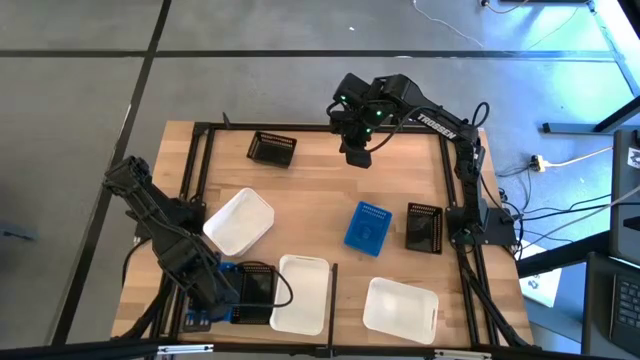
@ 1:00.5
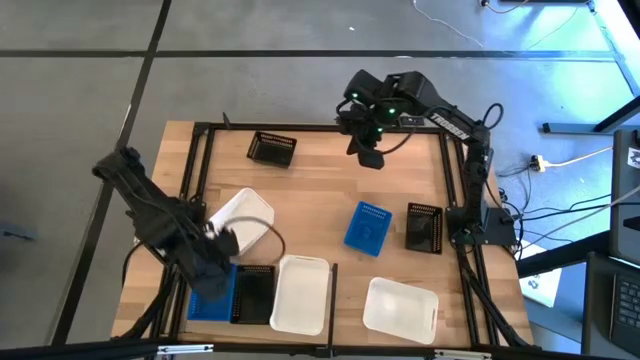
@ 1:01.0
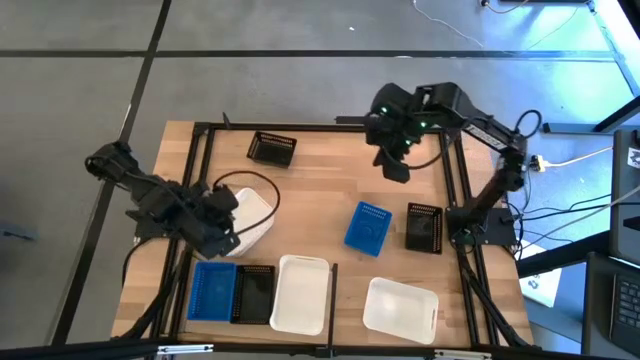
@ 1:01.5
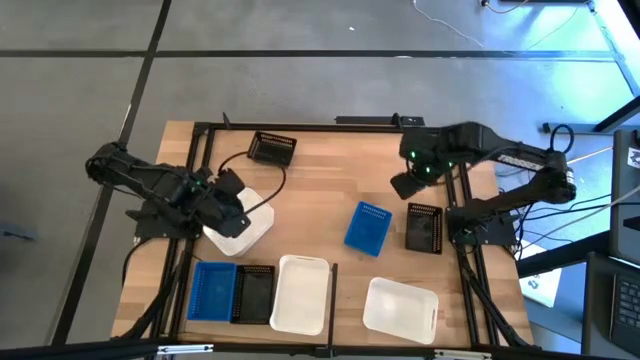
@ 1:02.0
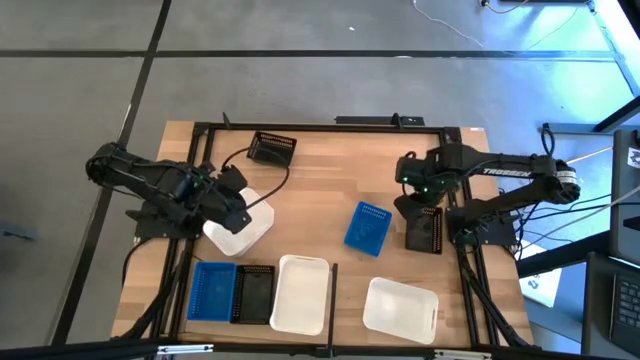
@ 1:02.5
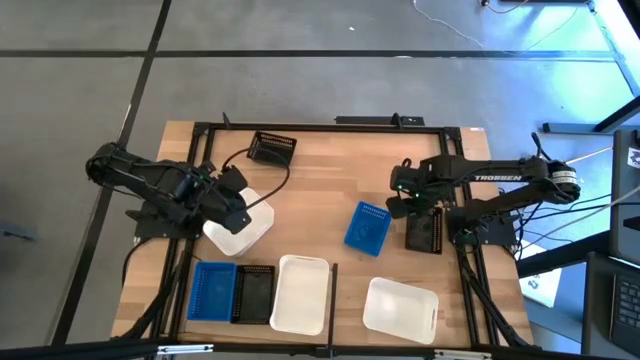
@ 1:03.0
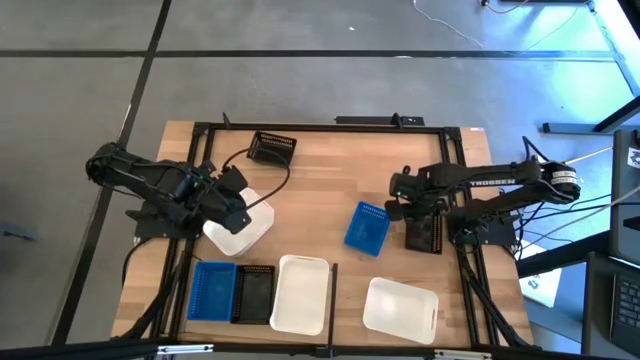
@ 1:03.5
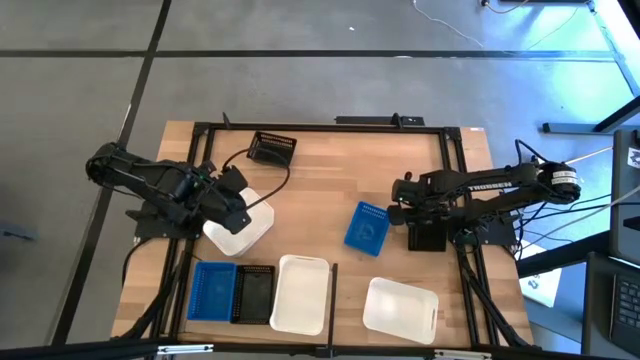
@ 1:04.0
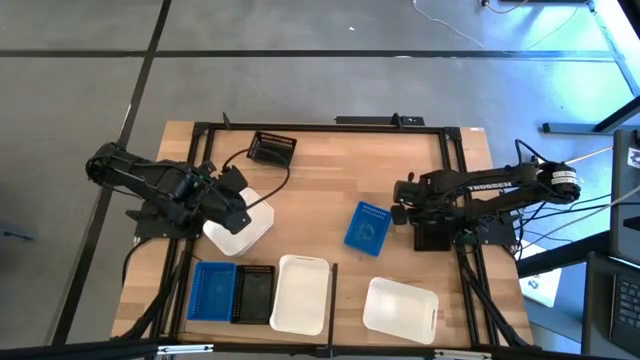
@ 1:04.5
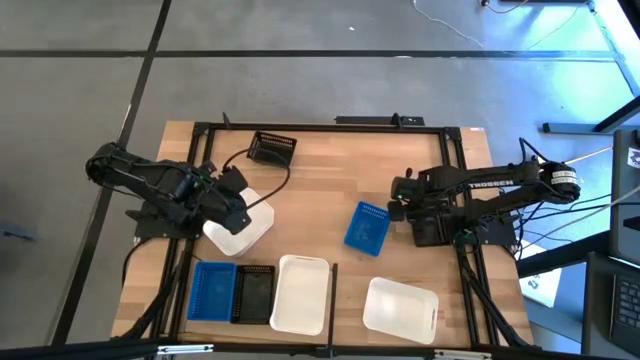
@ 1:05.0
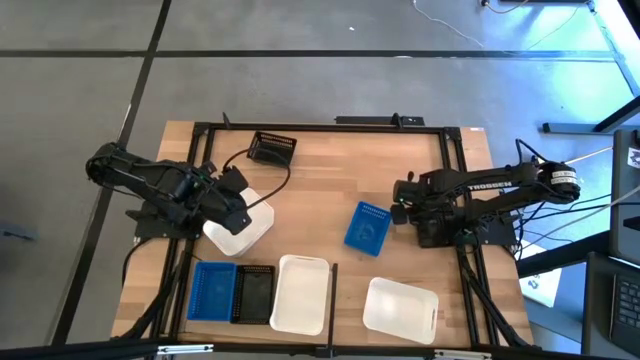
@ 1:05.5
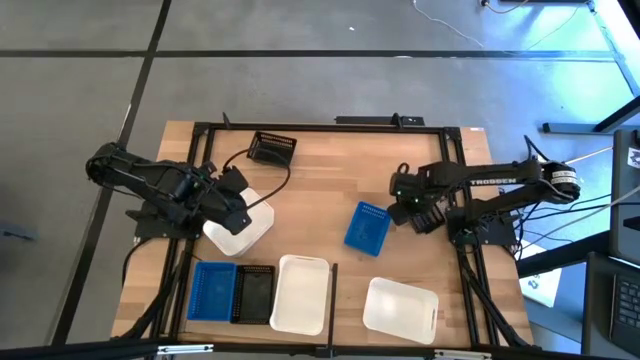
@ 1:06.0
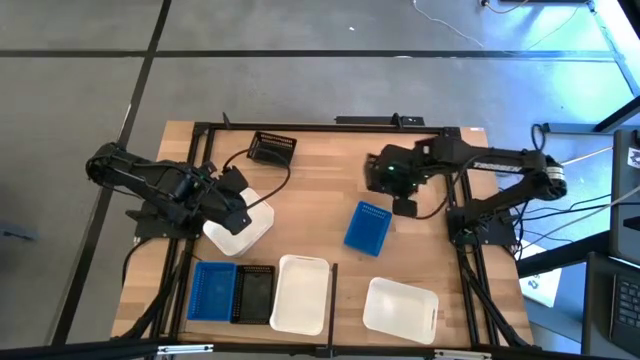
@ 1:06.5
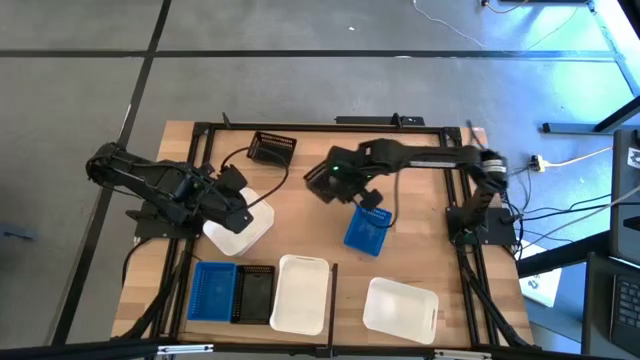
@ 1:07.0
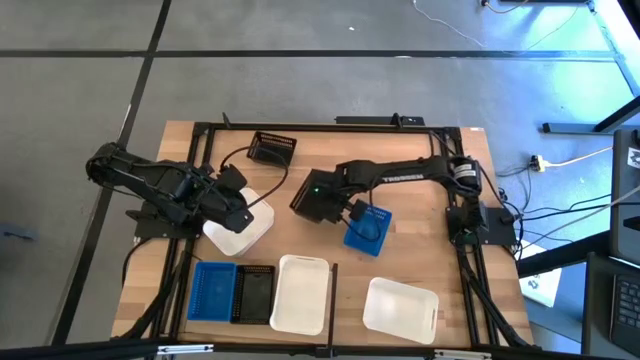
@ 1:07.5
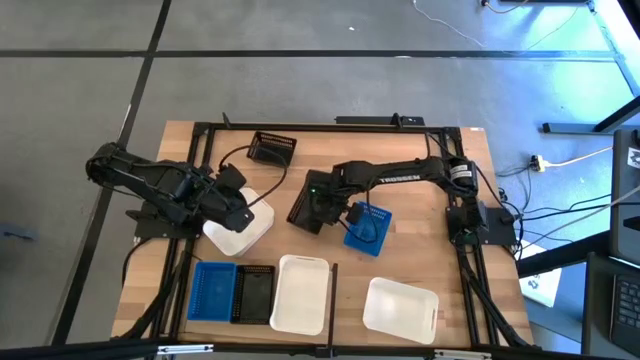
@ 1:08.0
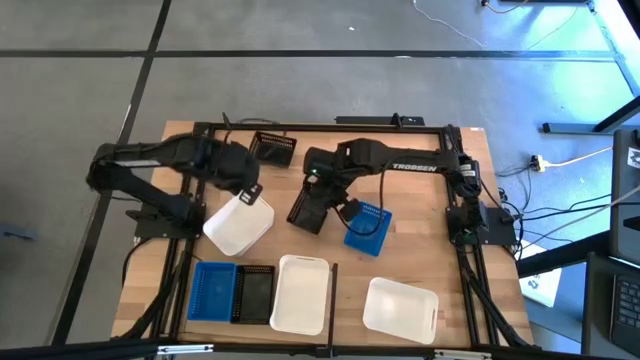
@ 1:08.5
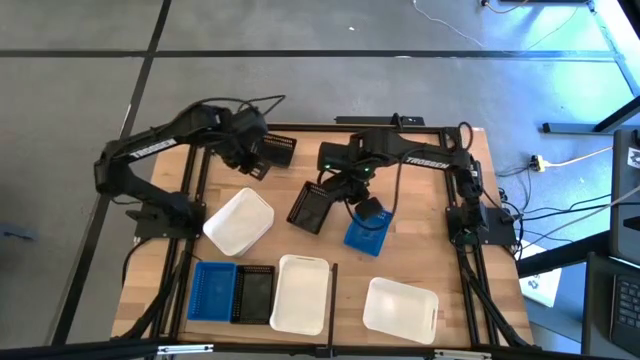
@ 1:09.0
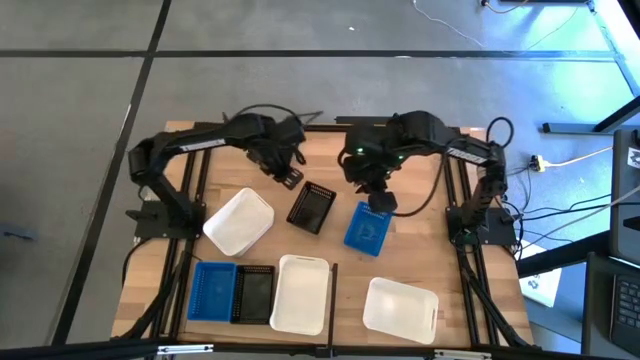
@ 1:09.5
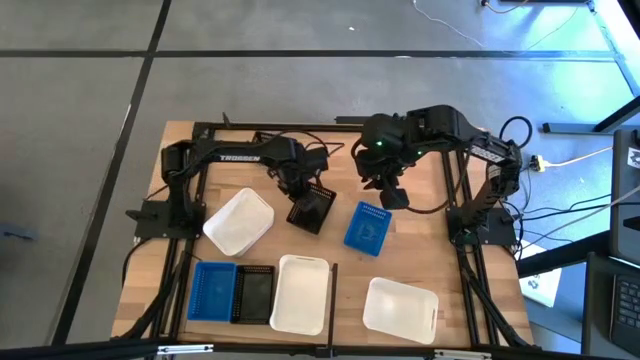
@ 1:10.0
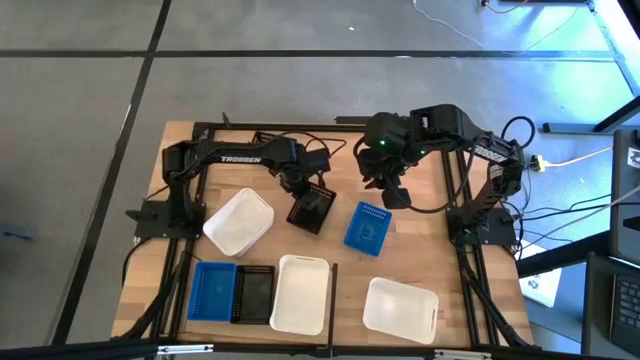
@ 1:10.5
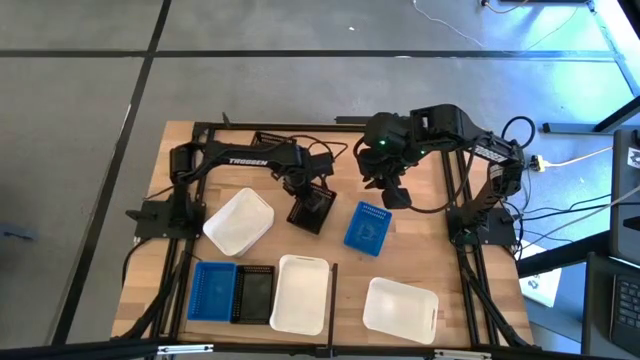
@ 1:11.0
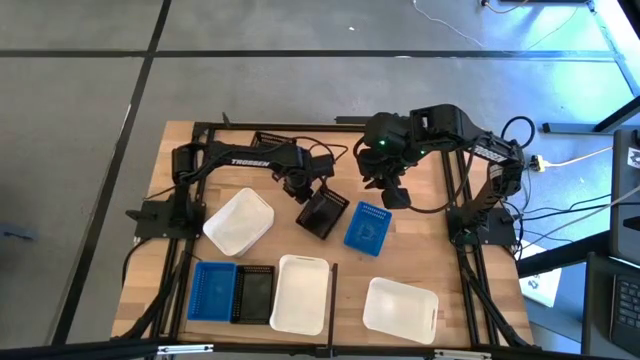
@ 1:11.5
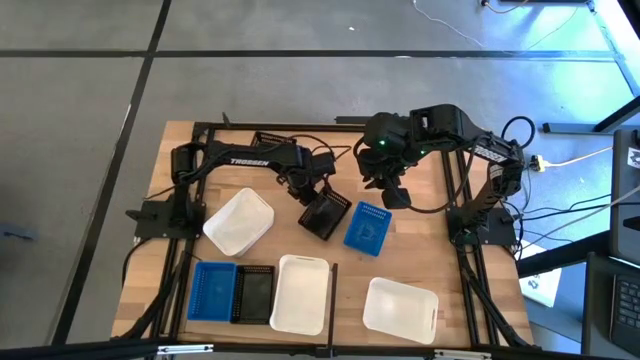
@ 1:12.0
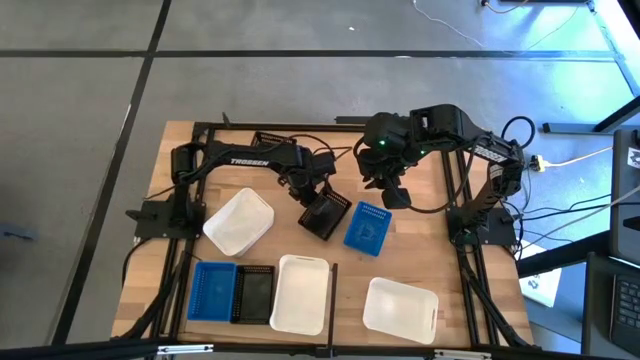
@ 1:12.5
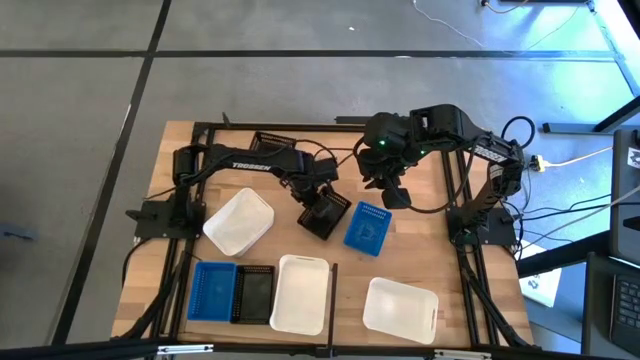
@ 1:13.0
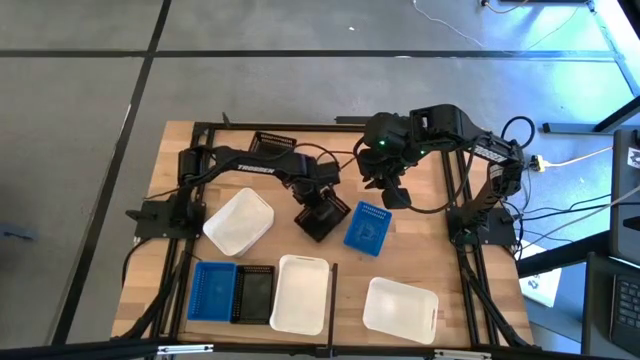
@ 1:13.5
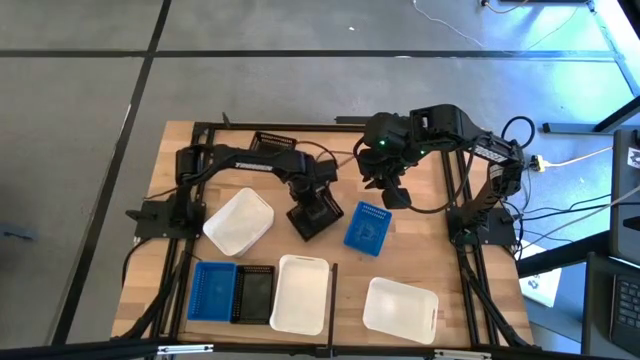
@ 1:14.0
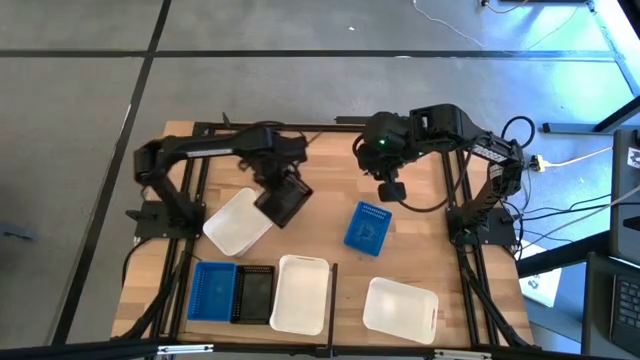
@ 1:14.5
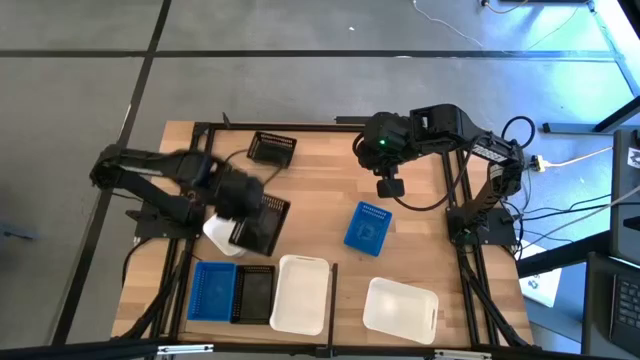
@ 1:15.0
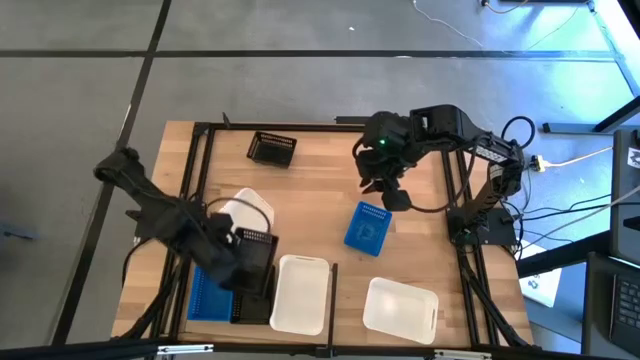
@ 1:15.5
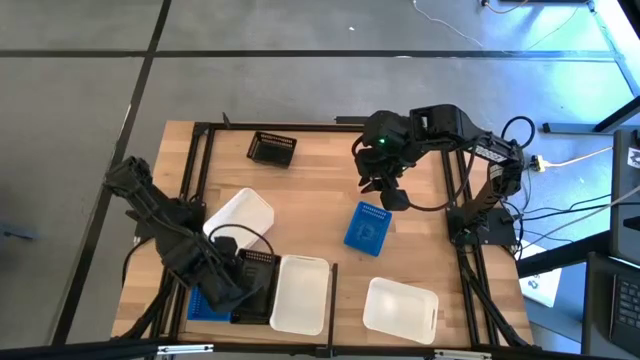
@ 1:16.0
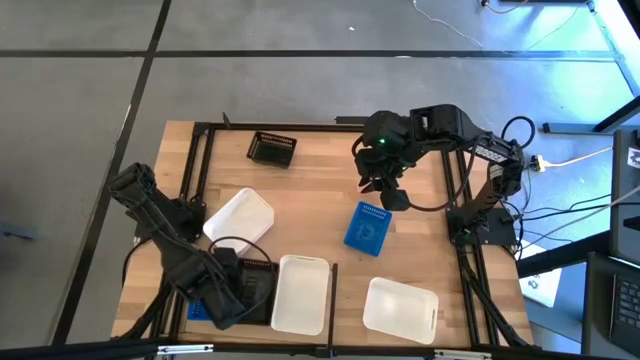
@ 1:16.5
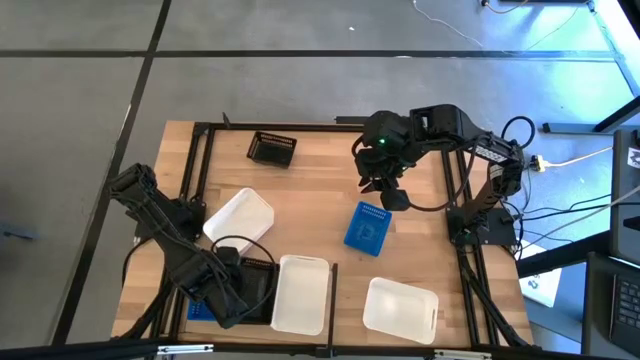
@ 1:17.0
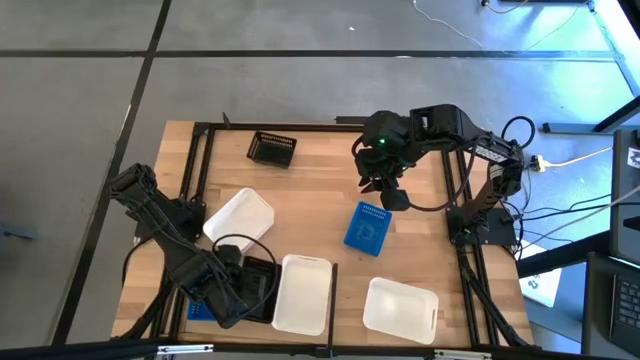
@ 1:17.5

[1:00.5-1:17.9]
Task: Stack baskets on shelf by color
Stack the bottom black bin on top of the black bin on the shelf

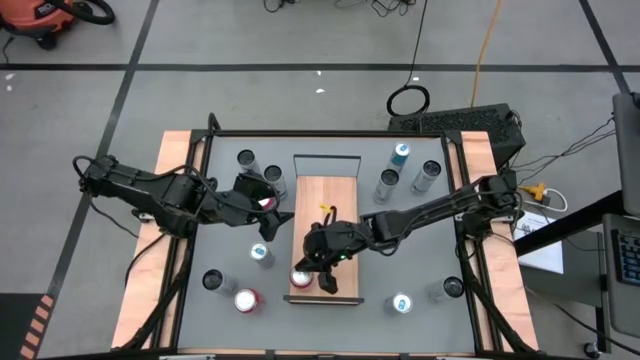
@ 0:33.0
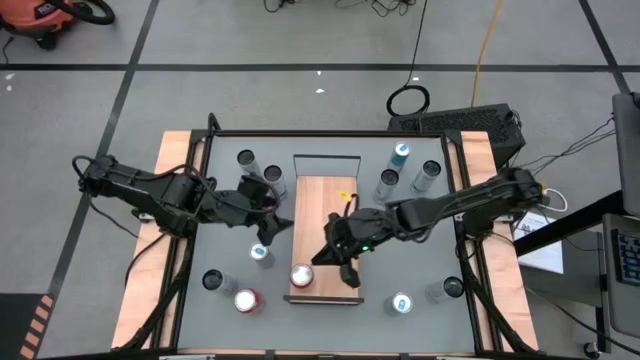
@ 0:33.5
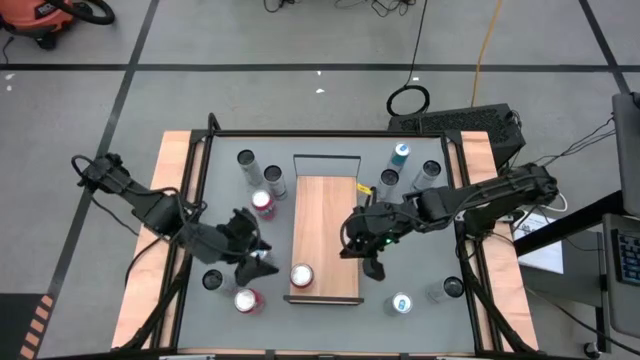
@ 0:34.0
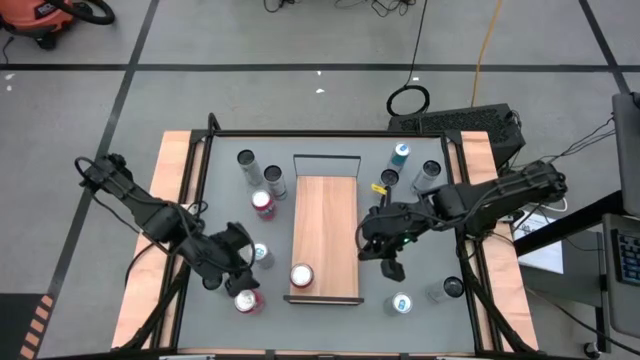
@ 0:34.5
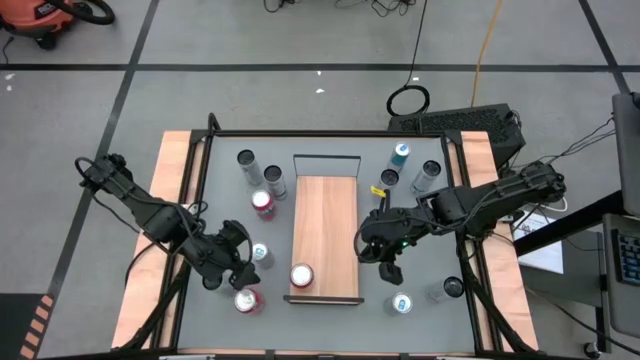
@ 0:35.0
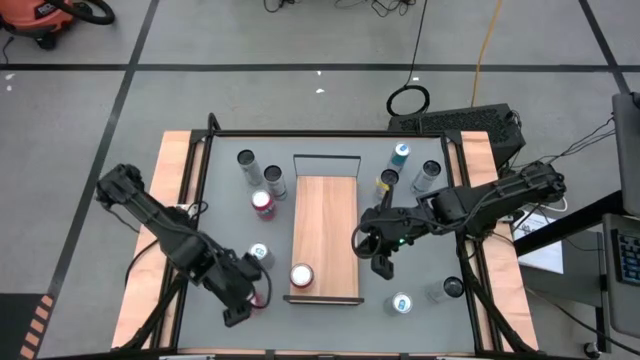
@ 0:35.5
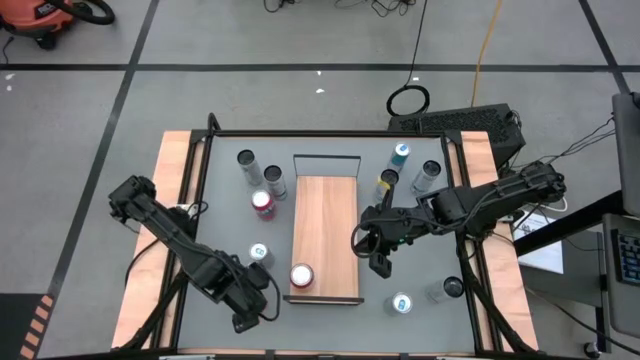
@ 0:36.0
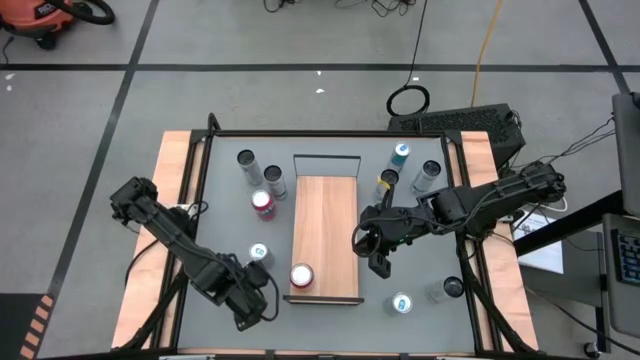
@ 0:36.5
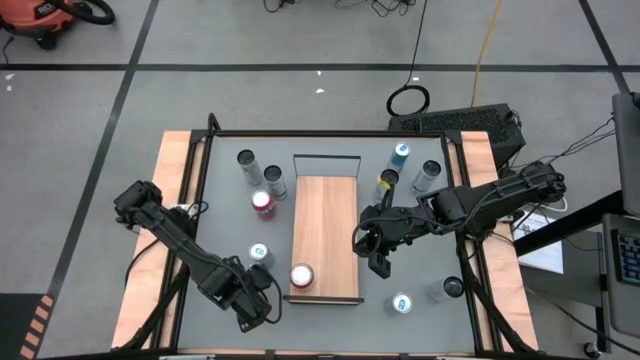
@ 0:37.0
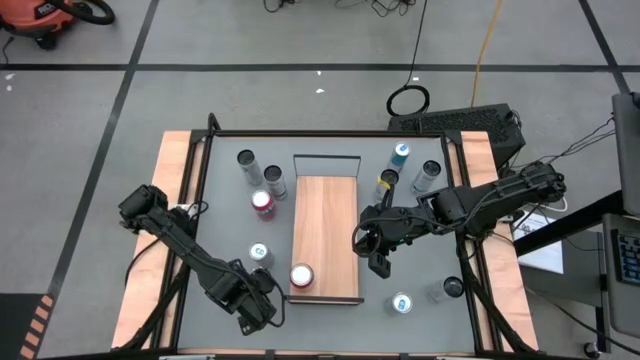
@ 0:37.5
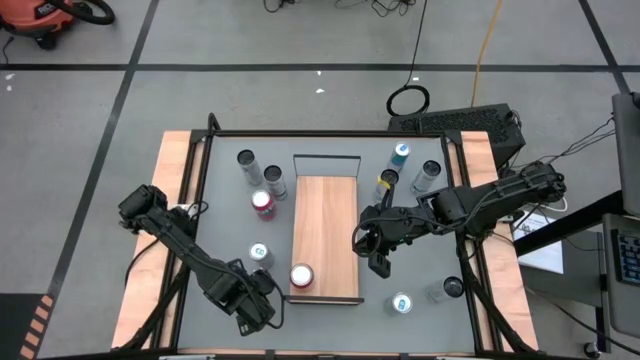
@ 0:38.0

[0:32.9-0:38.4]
Task: Sort soda cans
Put the bottom red soda can on the shelf and align it with the other red soda can
